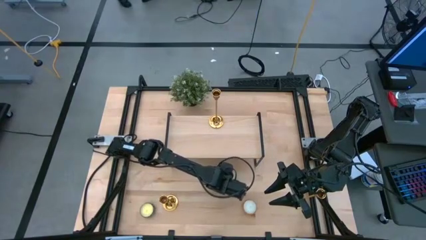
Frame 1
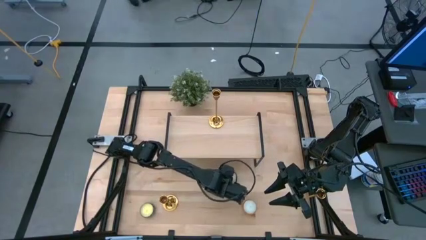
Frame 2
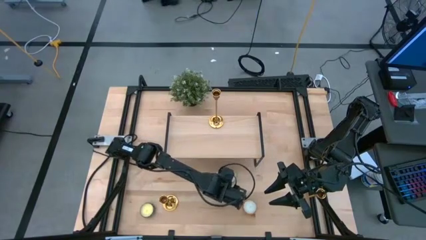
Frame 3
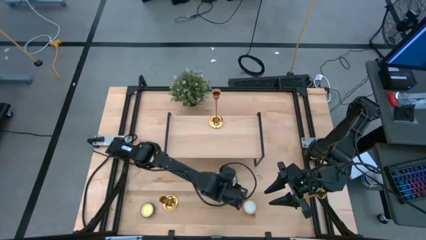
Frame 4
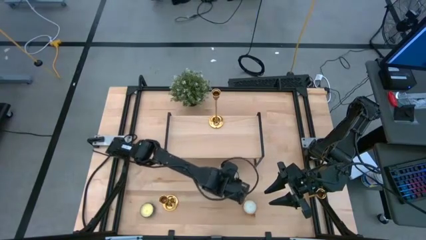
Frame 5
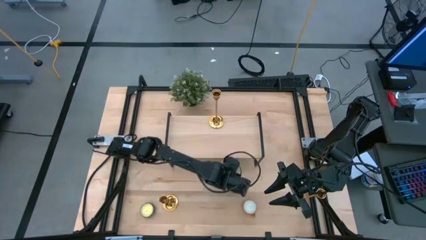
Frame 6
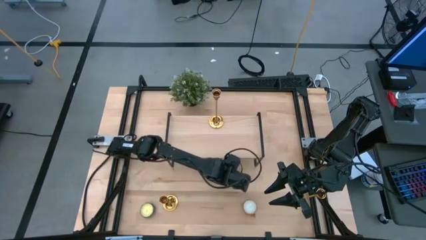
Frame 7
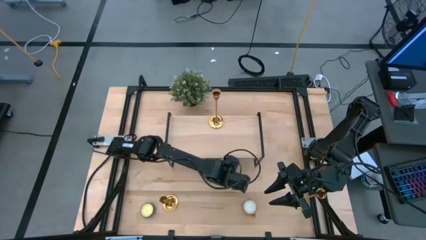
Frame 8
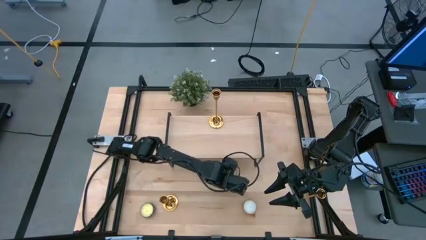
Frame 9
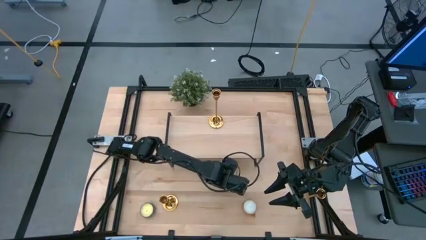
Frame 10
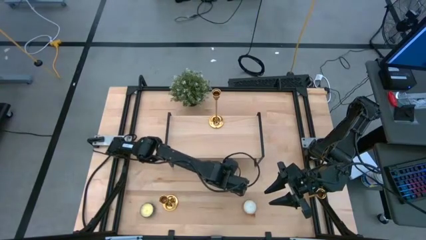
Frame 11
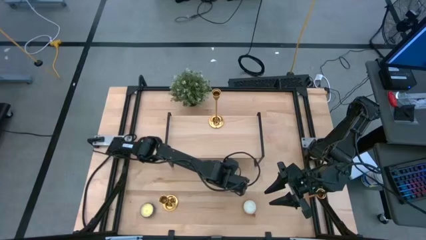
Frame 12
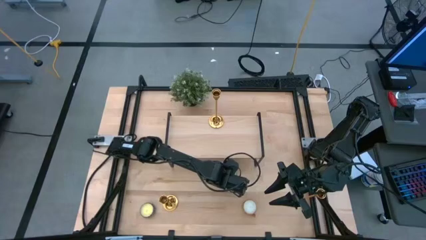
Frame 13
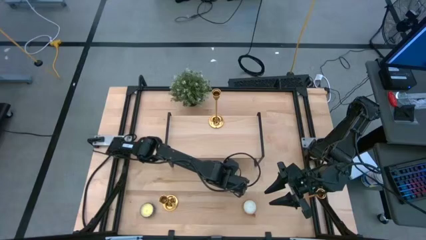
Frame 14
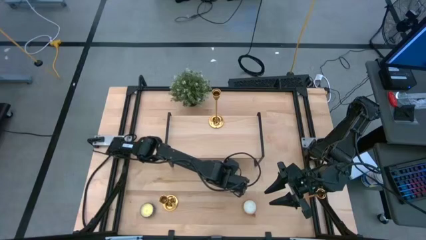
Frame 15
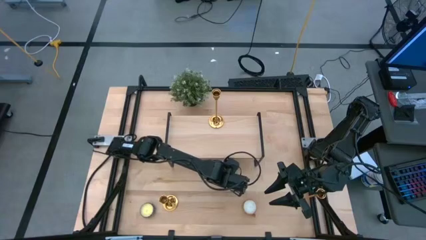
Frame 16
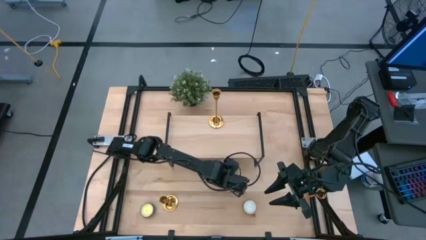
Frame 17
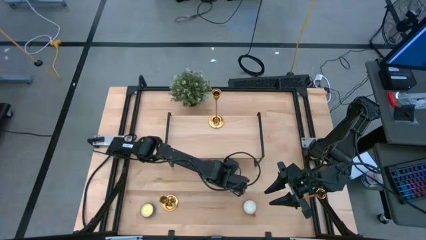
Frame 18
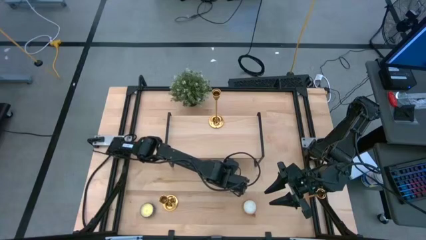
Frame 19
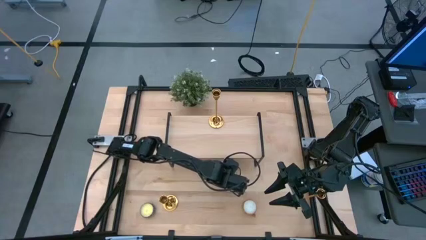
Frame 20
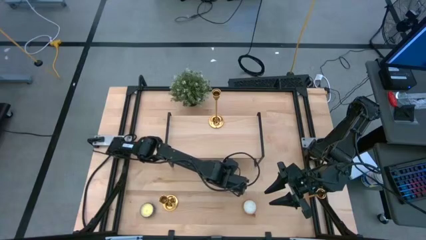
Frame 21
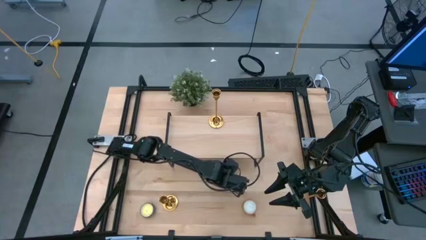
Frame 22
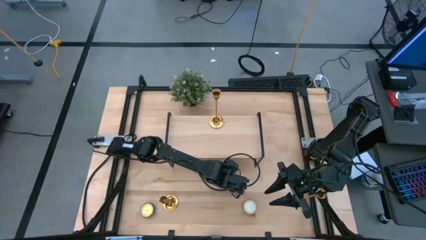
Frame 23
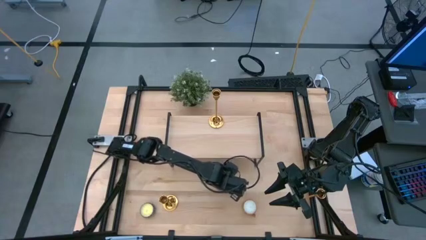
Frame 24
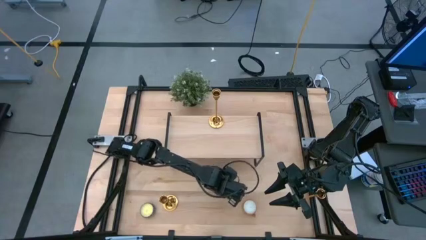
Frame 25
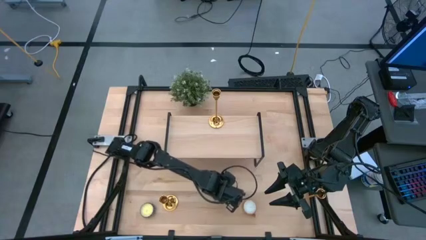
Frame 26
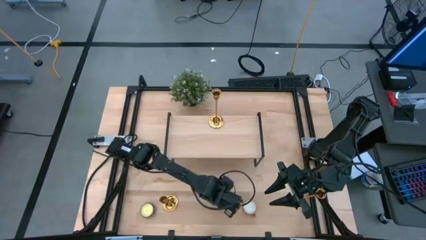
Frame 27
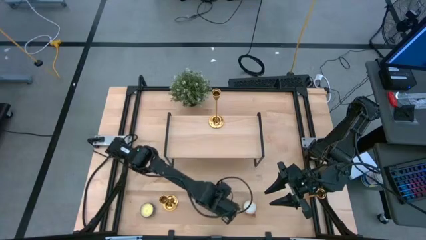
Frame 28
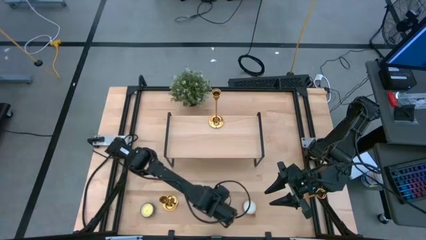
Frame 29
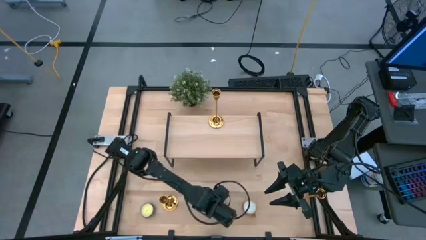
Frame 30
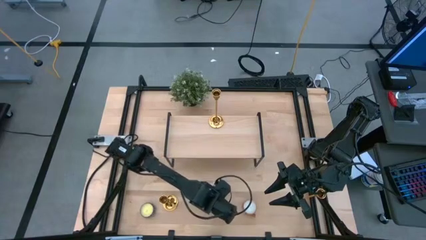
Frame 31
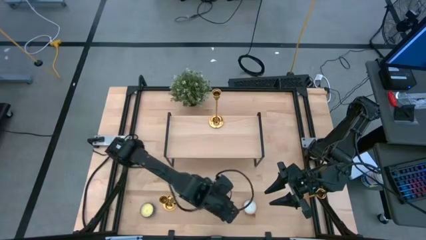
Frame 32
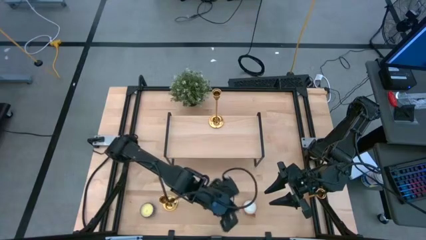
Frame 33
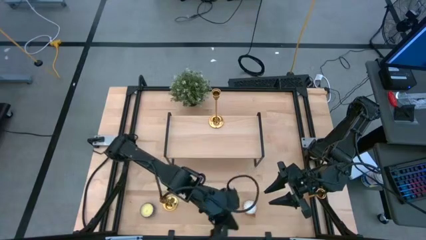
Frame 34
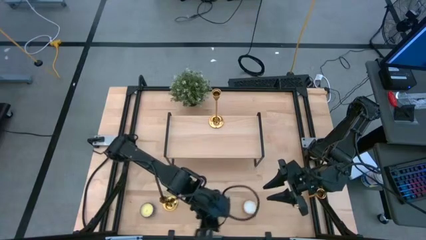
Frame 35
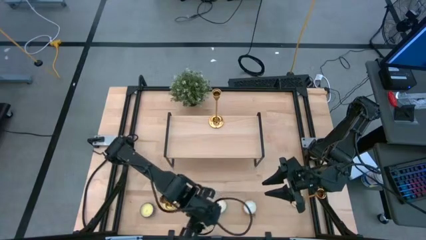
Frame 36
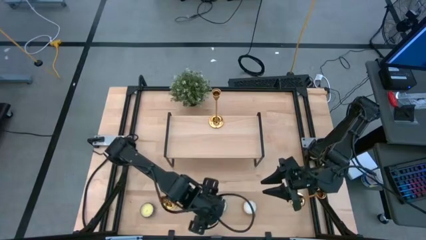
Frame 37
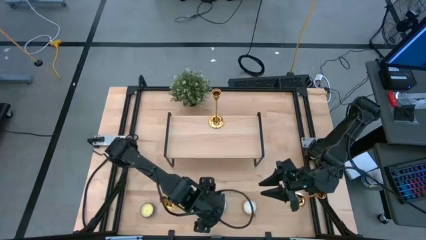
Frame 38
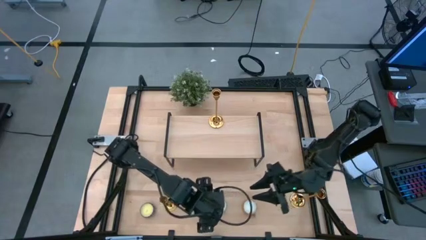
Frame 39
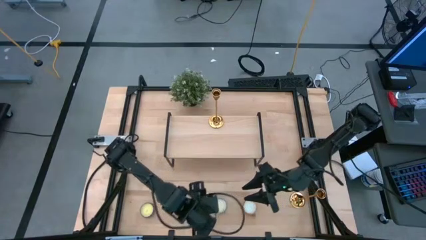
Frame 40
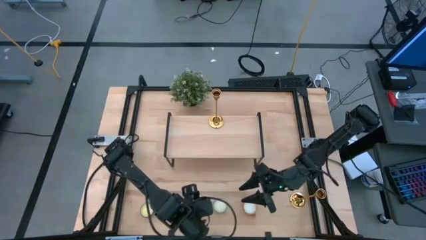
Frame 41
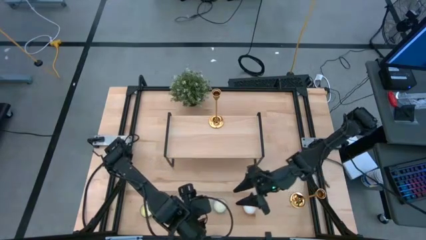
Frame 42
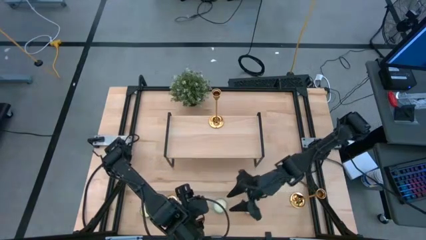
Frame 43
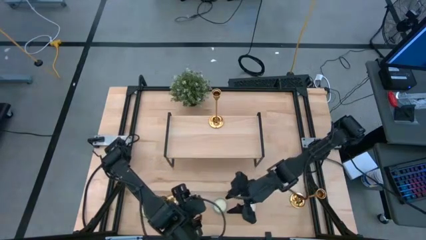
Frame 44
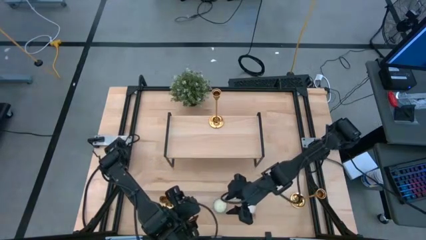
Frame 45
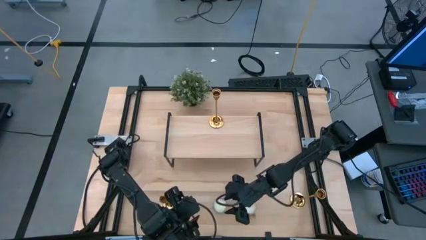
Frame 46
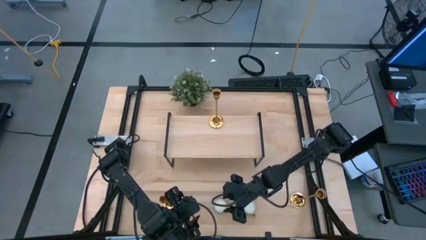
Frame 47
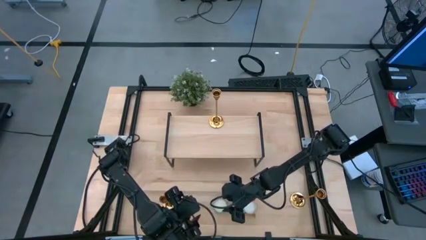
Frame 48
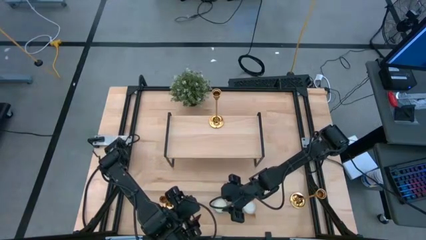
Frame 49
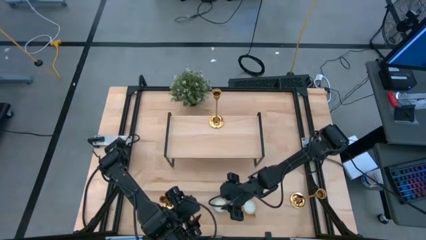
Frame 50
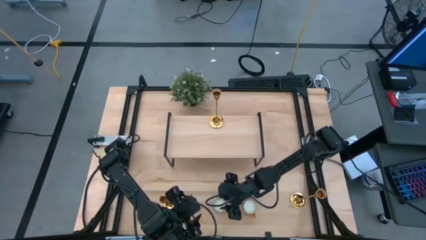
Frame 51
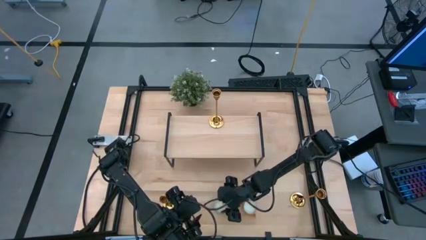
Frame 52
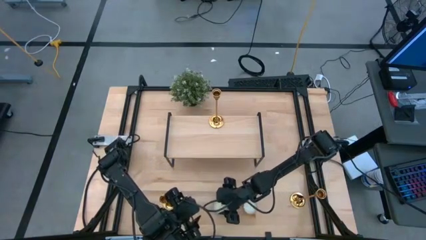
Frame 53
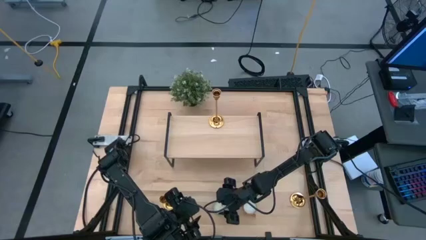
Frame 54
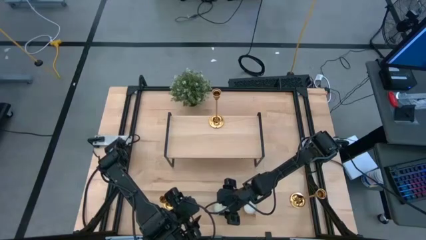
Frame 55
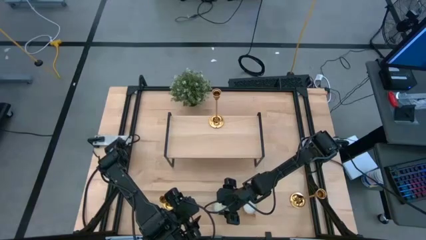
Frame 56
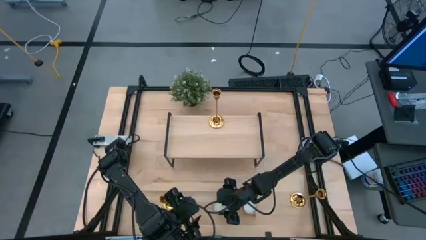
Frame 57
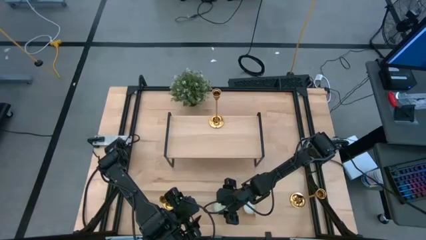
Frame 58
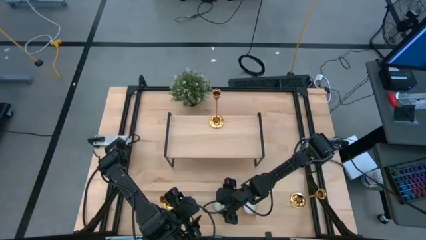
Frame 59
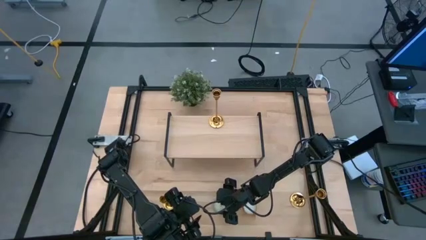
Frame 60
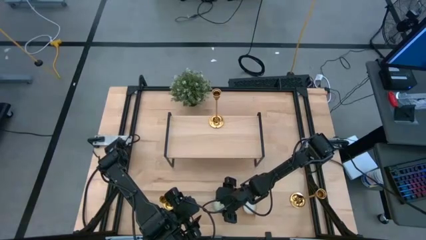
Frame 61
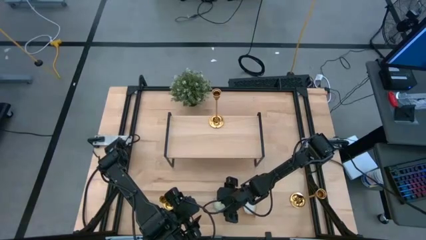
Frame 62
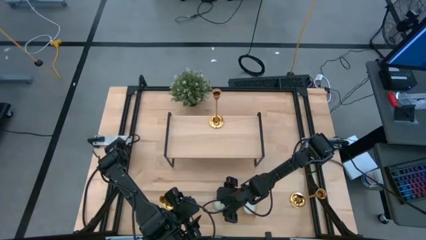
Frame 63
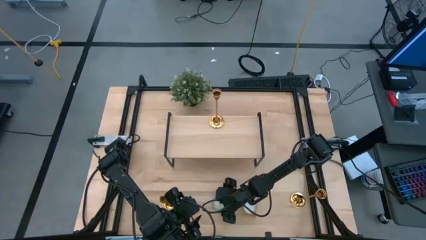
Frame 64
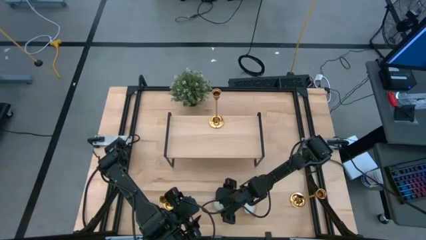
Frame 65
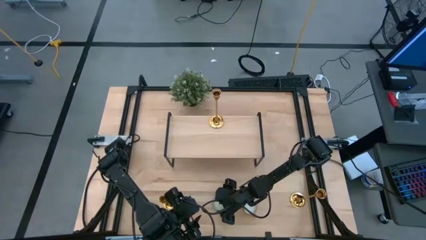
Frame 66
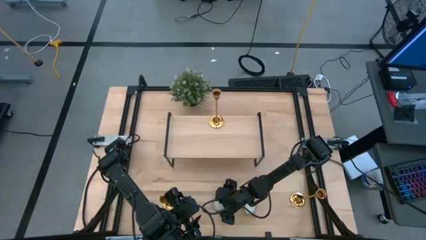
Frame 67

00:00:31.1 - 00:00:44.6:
Task: Stock candles and holders on shelf
Put the blue scented candle on the shelf
